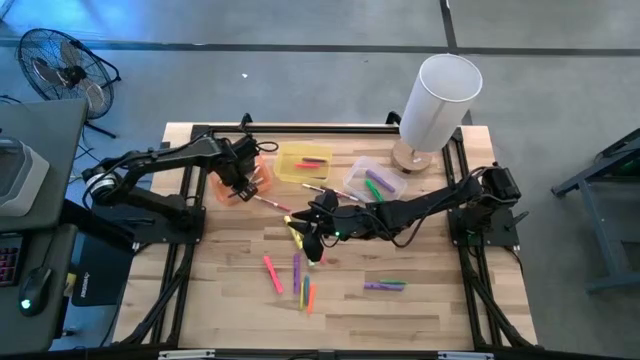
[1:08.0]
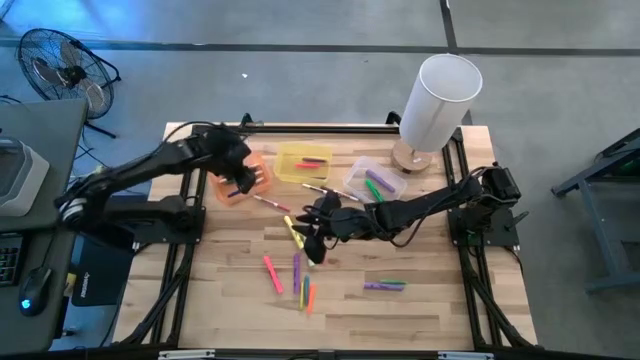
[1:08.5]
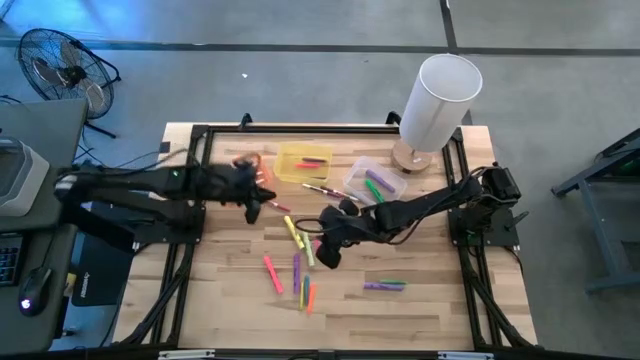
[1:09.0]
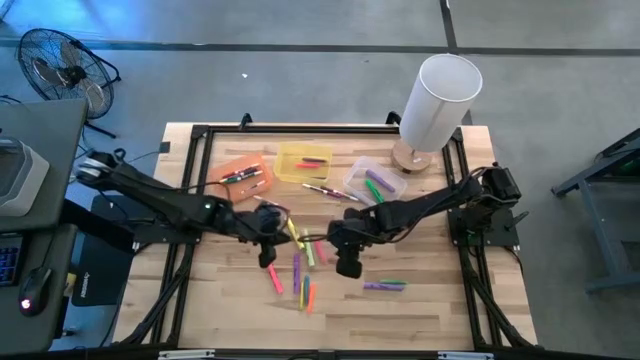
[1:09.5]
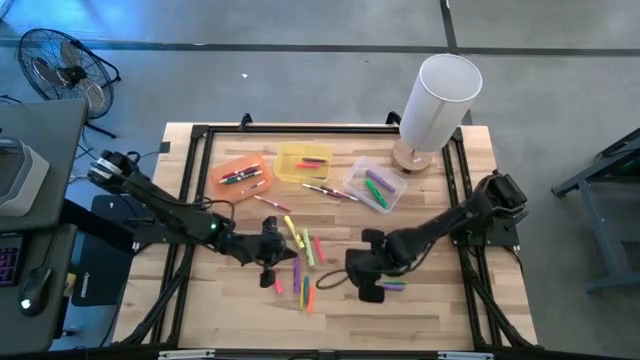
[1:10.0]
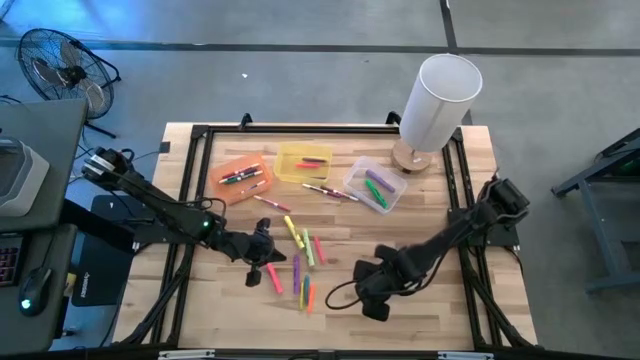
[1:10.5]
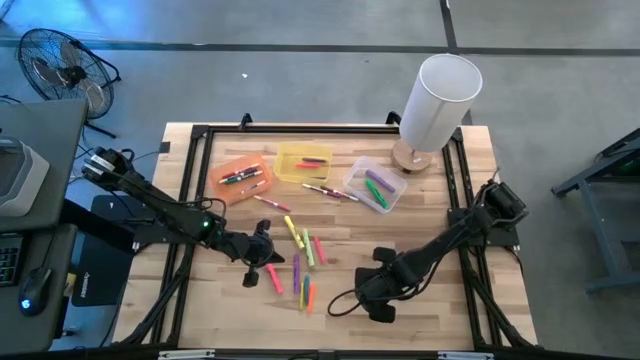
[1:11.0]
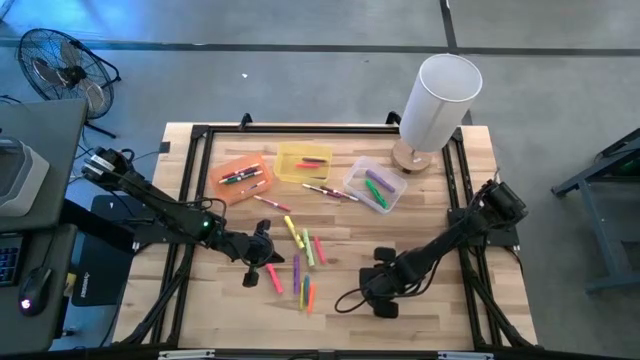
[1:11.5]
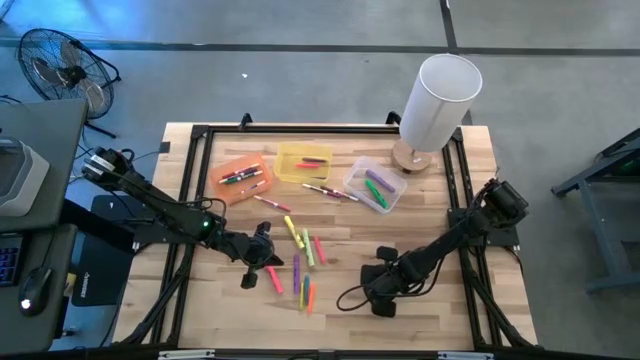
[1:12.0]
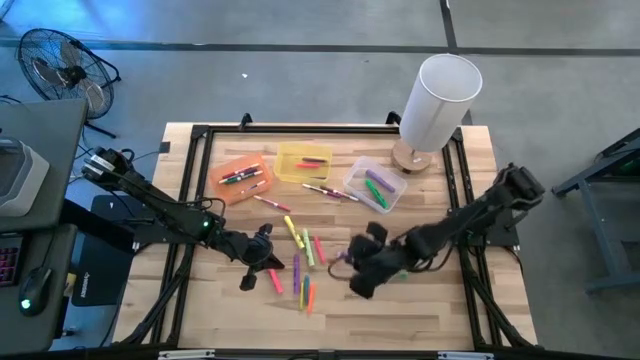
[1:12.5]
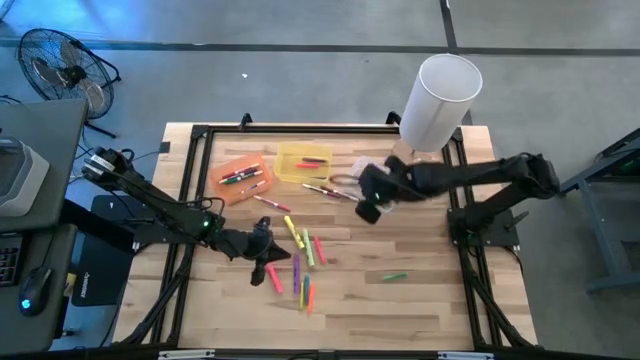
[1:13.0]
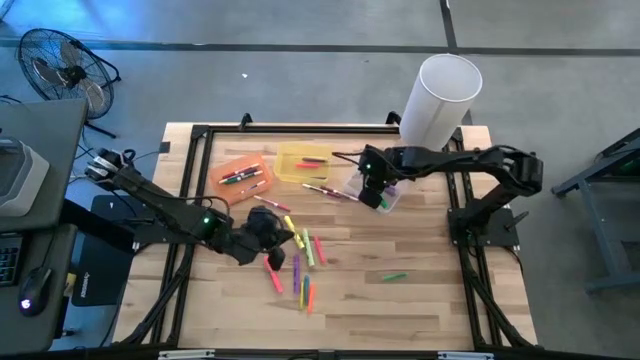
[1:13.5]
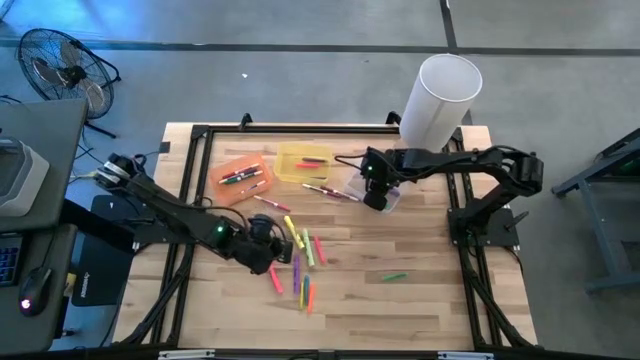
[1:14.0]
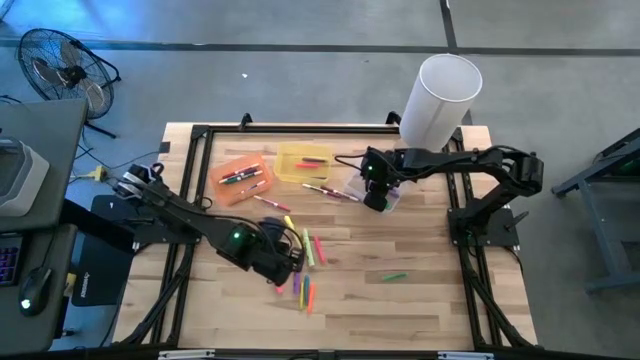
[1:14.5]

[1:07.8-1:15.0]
Task: Pick & Place Markers
Put the purple highlighter pen into the white bin

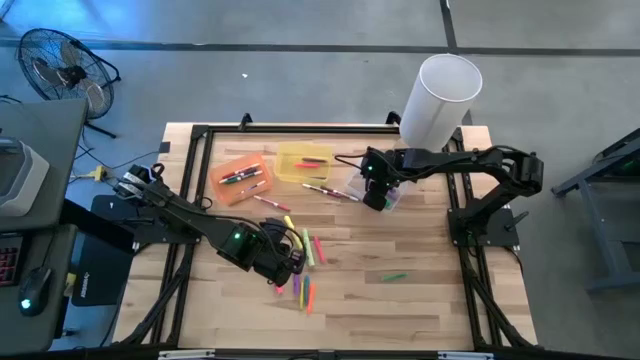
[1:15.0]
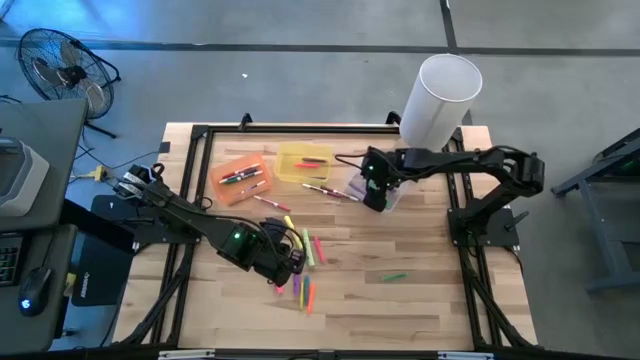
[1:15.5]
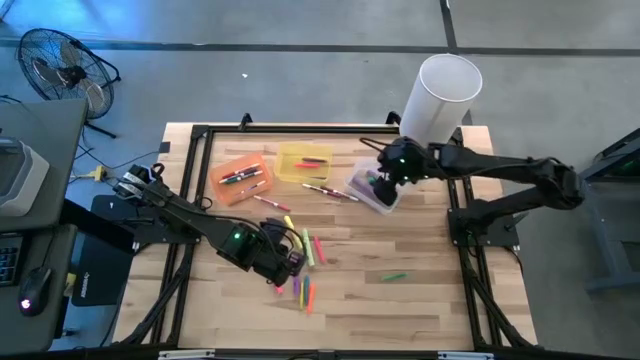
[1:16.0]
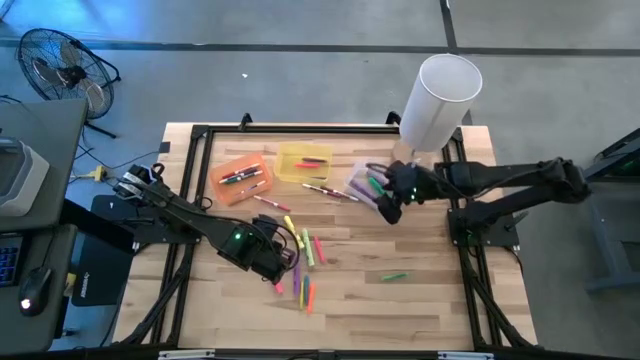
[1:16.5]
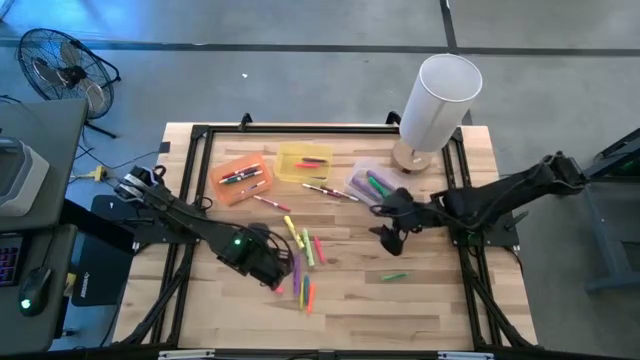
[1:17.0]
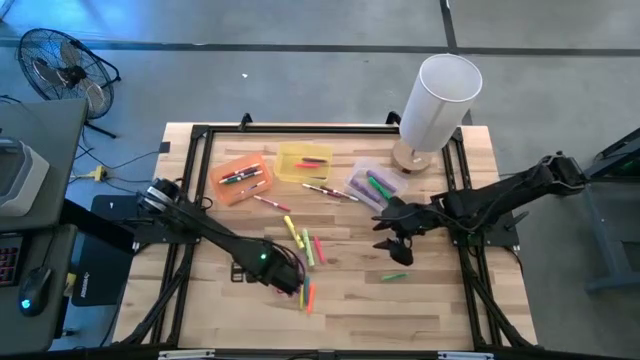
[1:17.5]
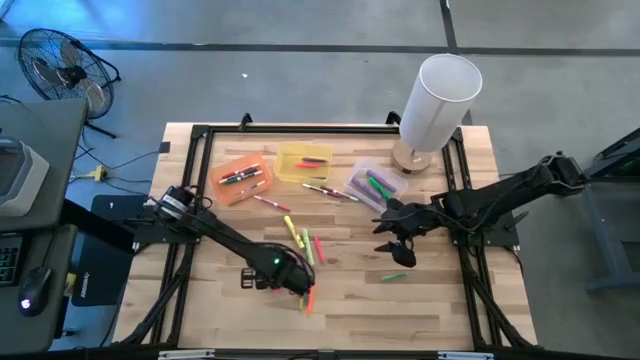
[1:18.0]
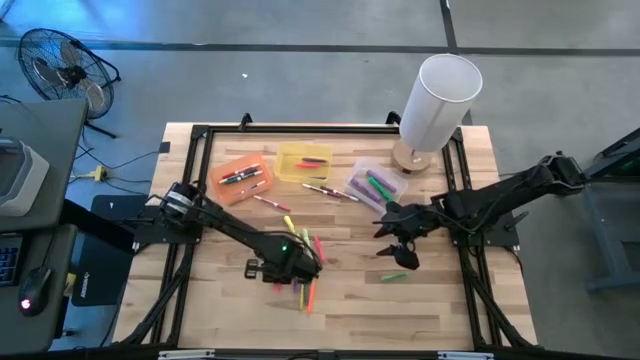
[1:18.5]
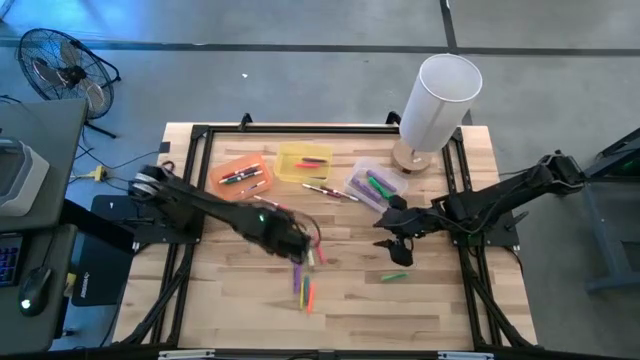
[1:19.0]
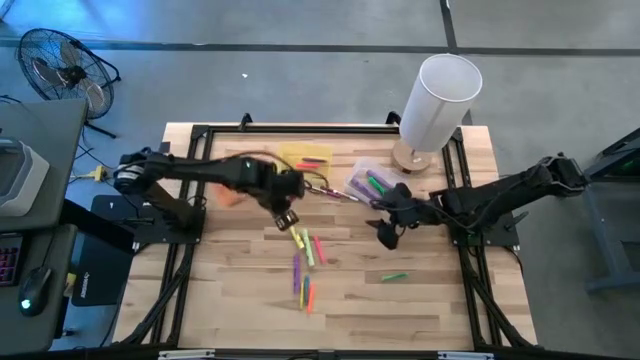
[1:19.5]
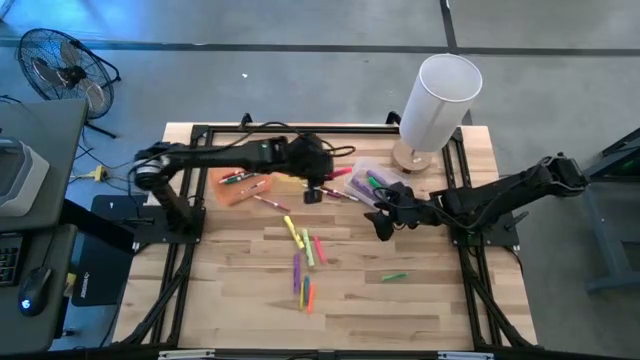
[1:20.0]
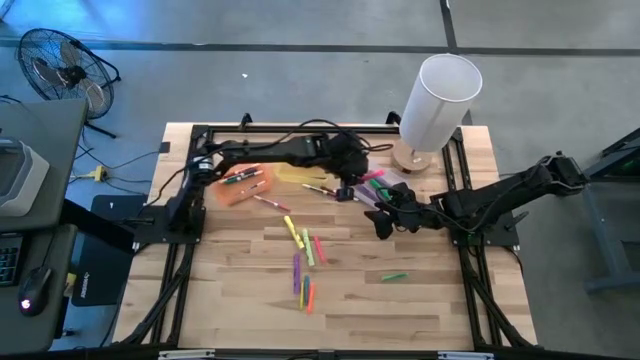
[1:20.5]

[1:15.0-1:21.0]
Put the pink highlighter pen into the white bin

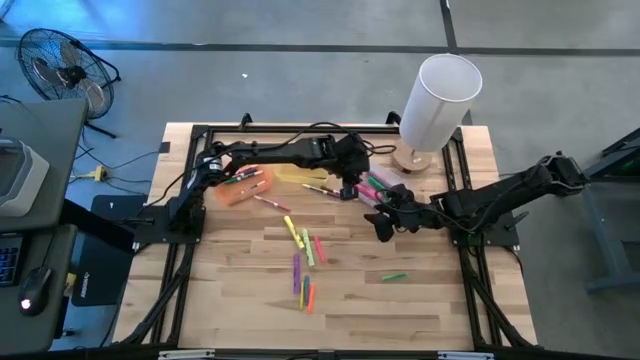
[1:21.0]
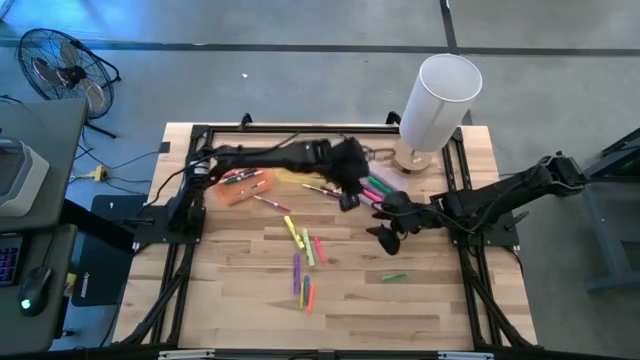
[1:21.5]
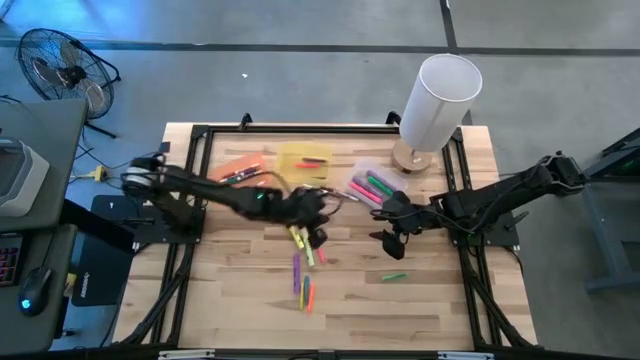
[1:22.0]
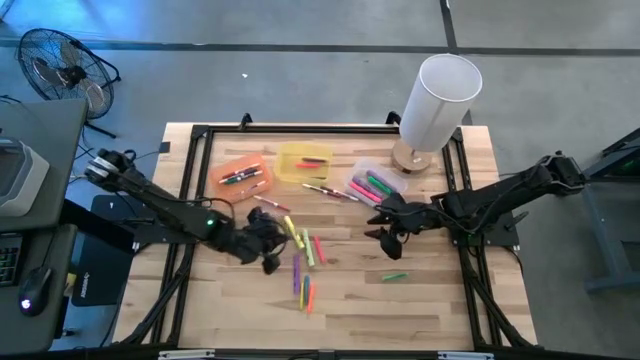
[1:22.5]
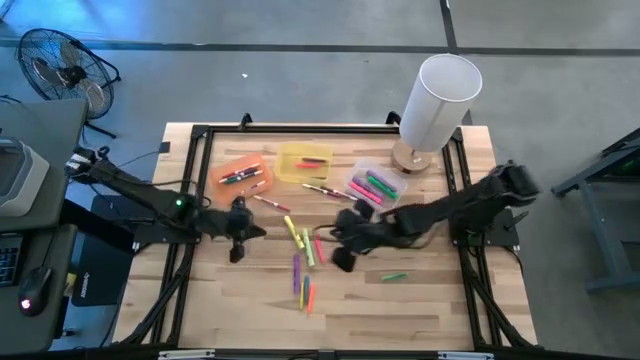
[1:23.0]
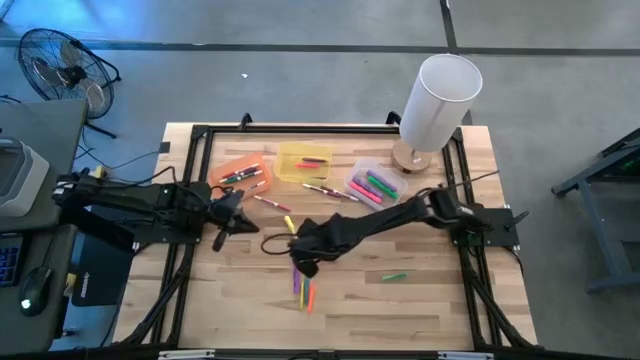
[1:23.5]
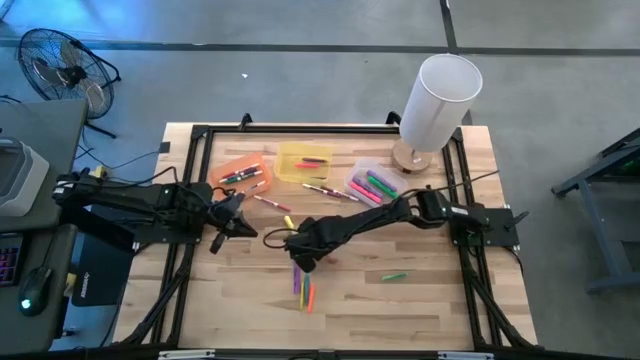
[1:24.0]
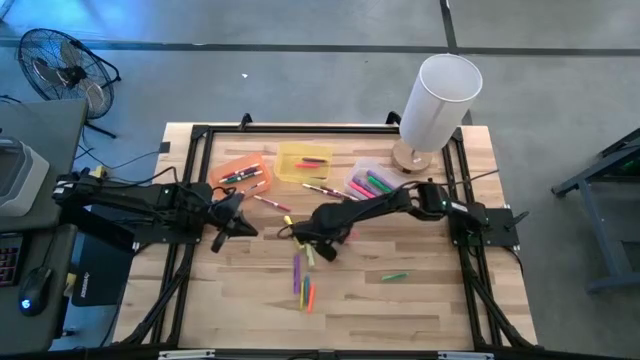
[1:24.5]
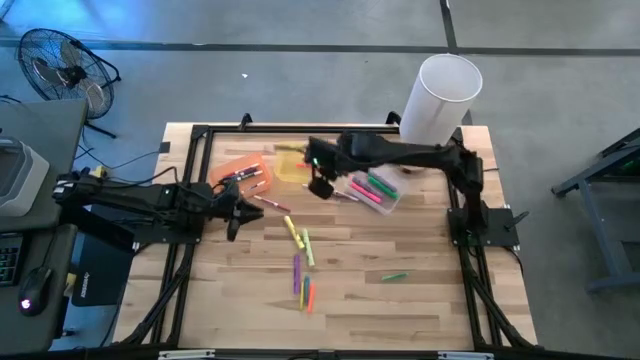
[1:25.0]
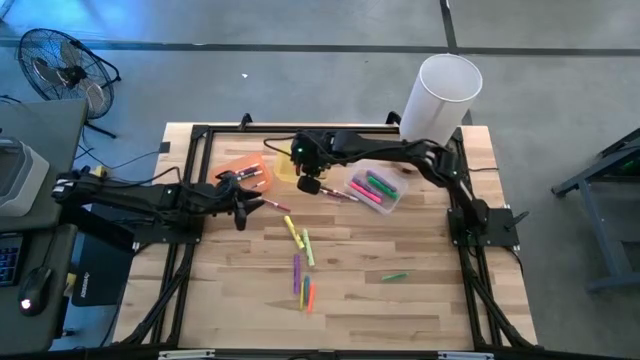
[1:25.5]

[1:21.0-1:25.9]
Put the pink pen into the yellow bin

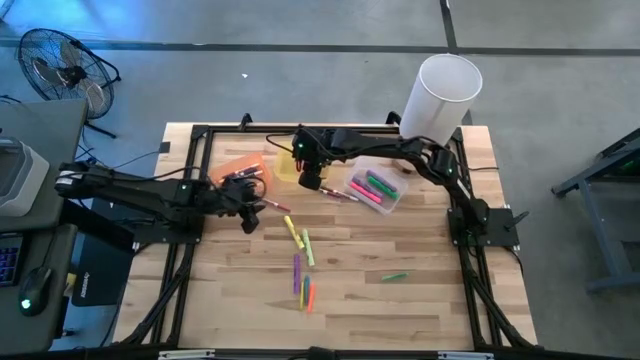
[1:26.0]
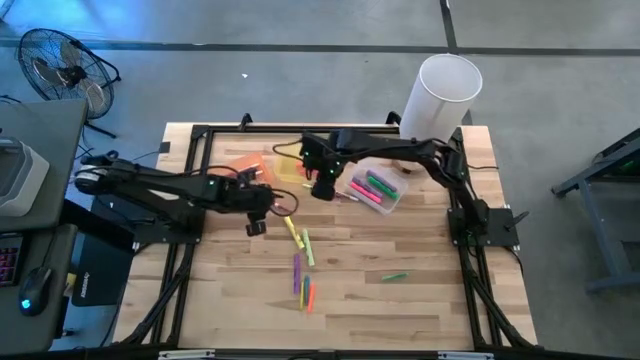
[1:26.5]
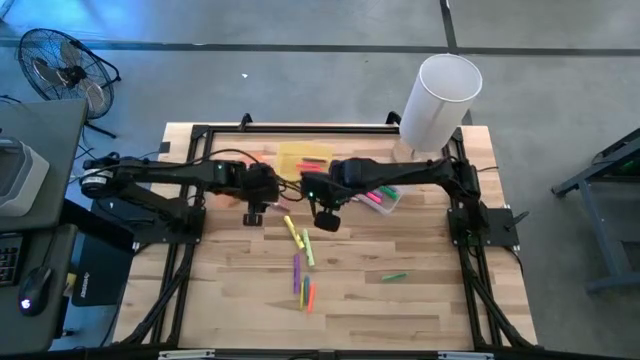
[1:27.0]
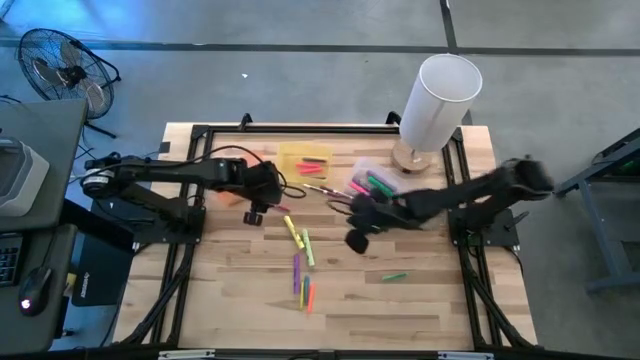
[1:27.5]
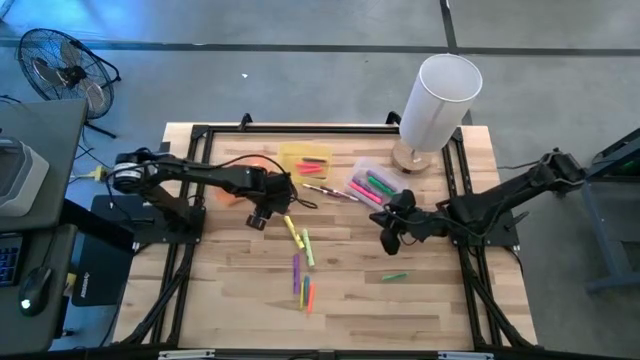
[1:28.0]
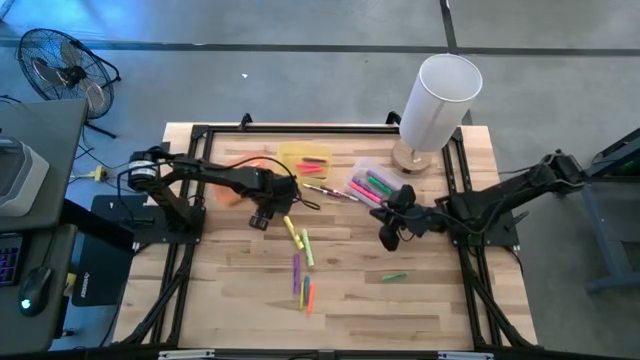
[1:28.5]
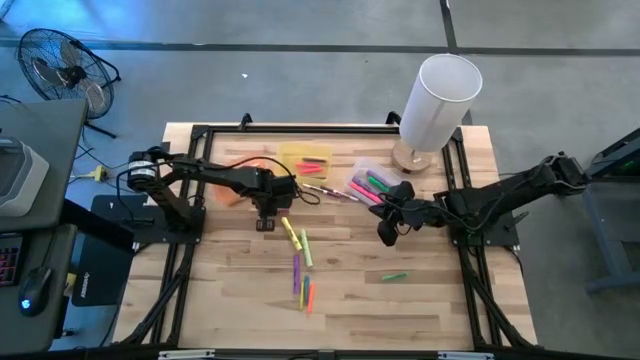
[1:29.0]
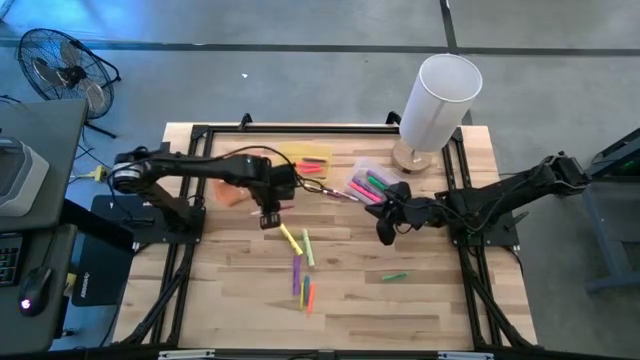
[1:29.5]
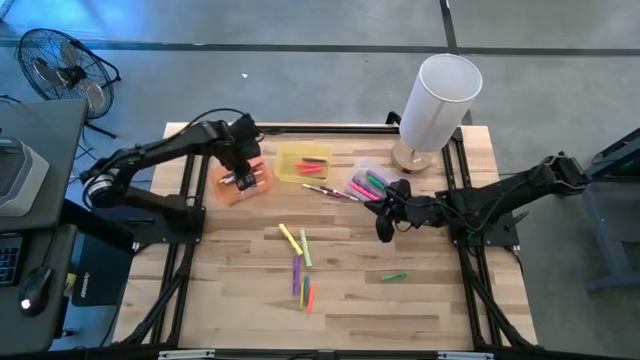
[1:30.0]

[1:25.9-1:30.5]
Put the pink marker pen into the orange bin
